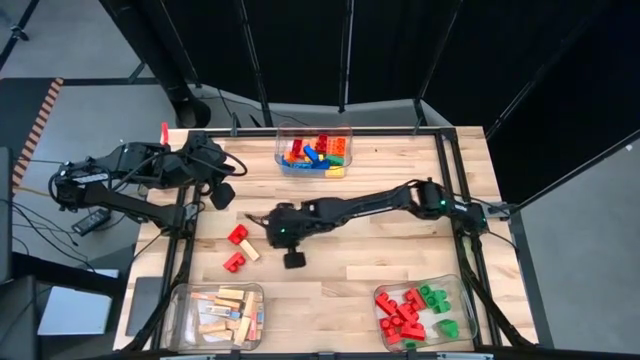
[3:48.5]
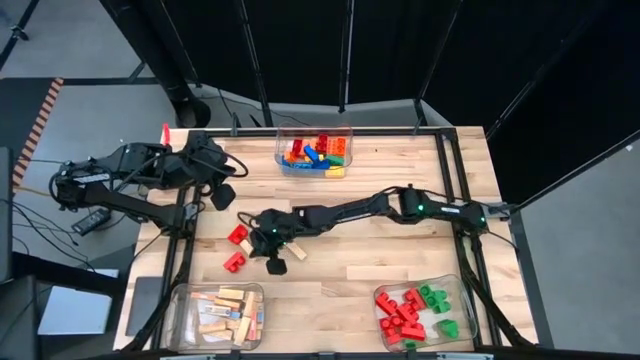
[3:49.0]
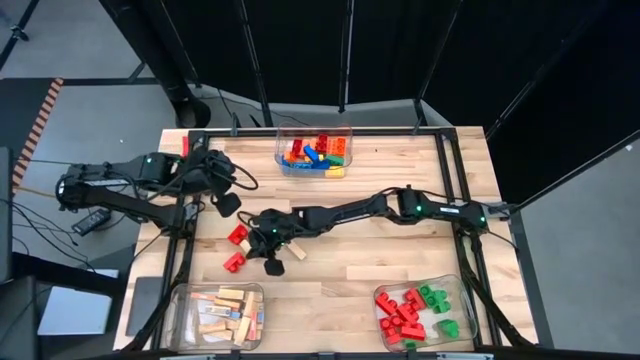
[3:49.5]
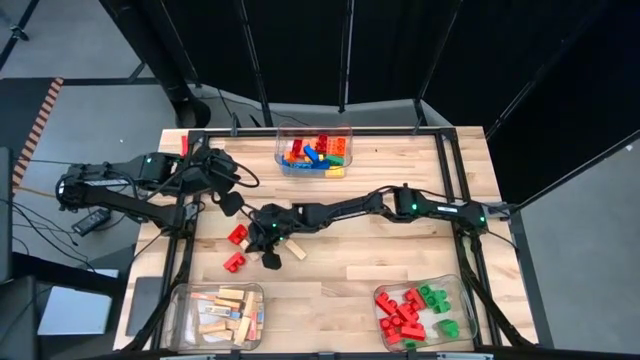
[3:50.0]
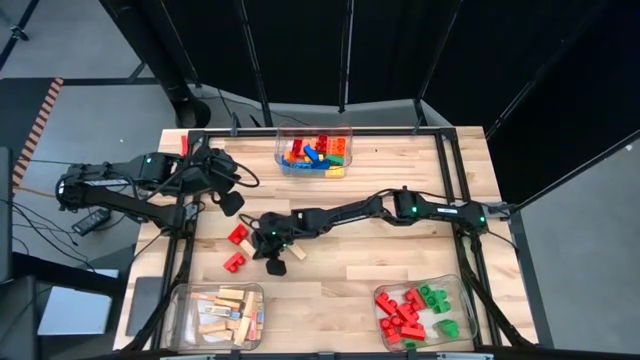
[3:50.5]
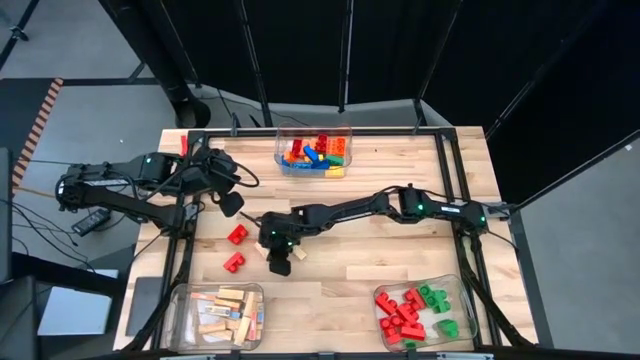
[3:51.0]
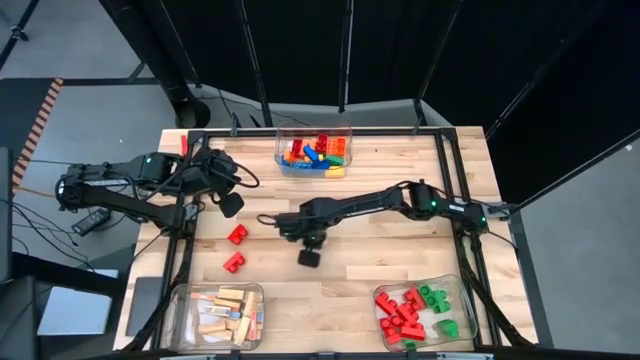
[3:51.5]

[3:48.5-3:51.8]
Task: Sort blocks by size
Move the white block to the center

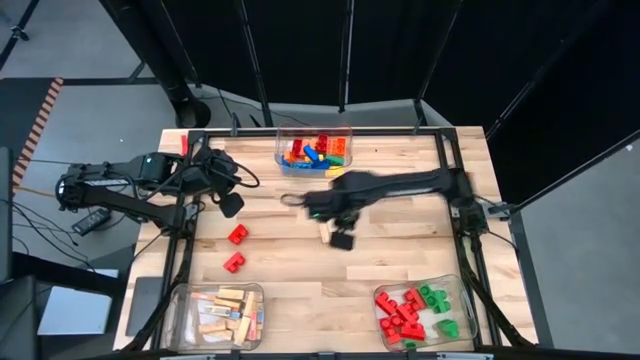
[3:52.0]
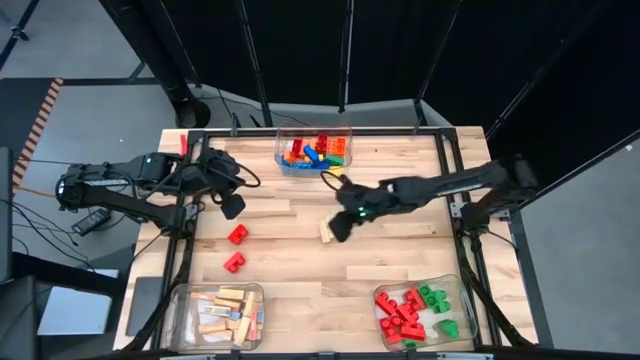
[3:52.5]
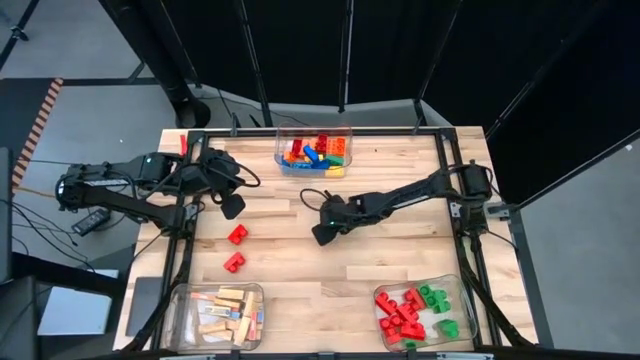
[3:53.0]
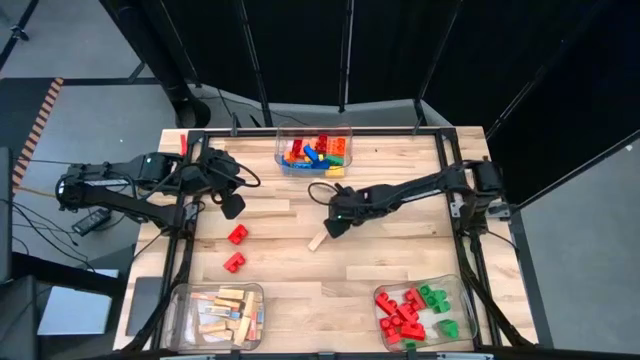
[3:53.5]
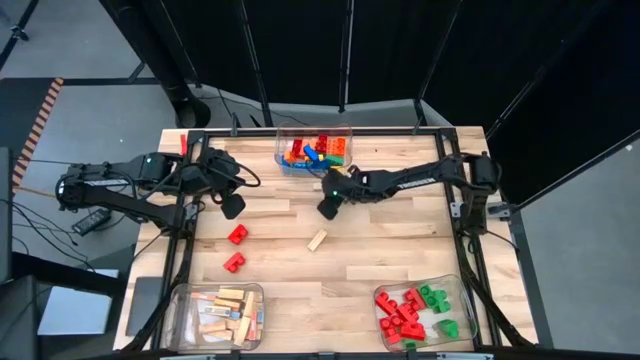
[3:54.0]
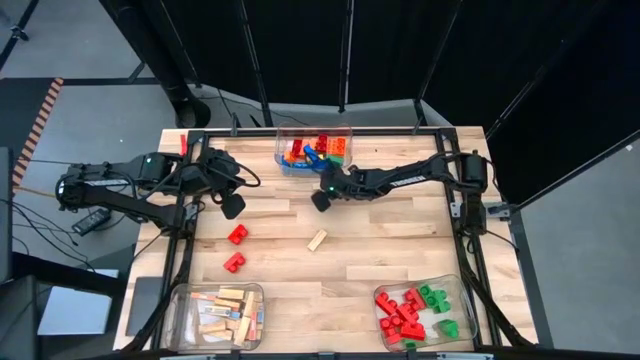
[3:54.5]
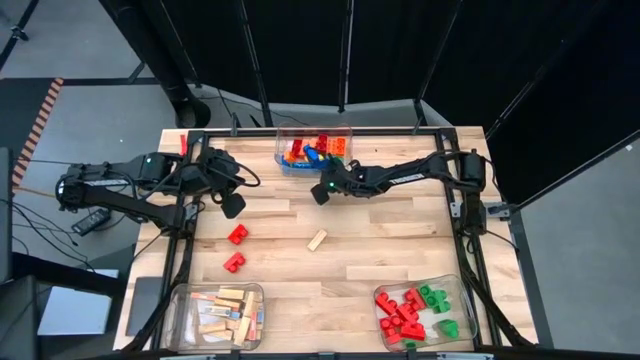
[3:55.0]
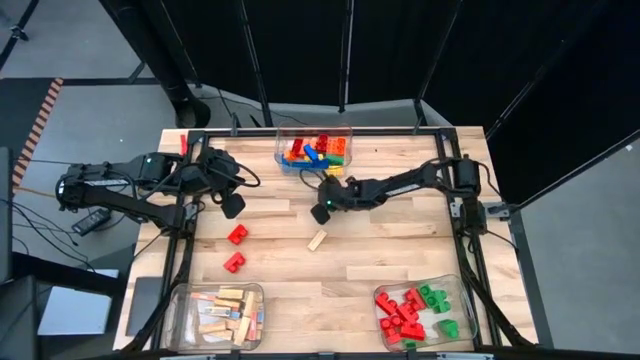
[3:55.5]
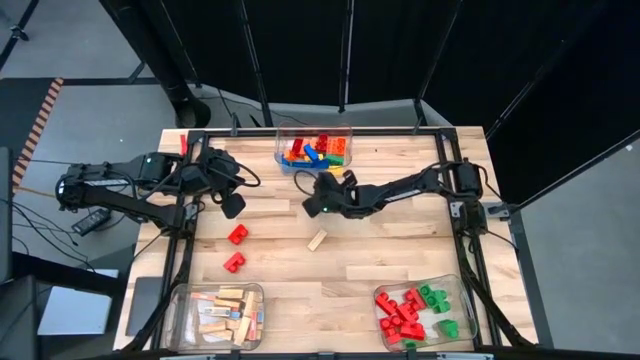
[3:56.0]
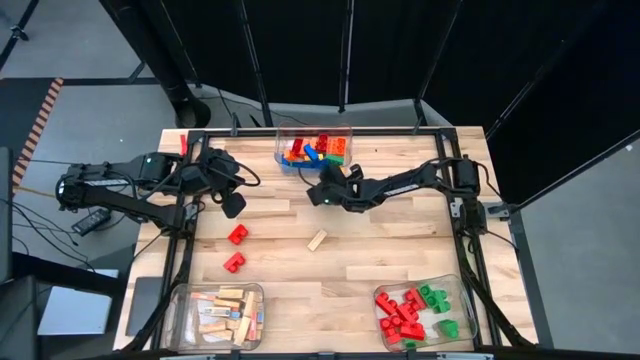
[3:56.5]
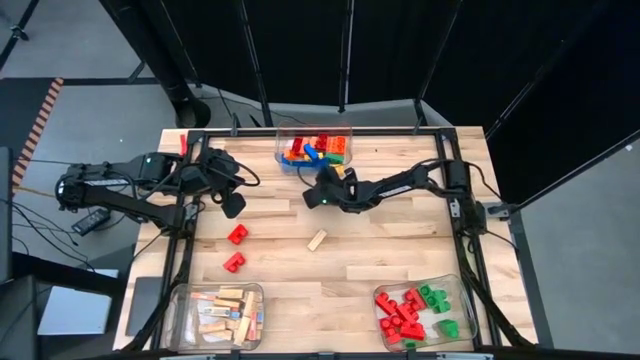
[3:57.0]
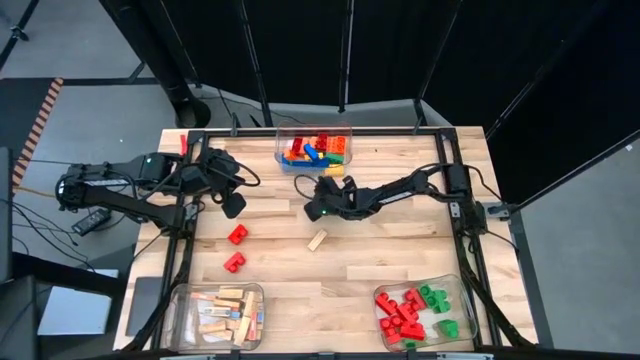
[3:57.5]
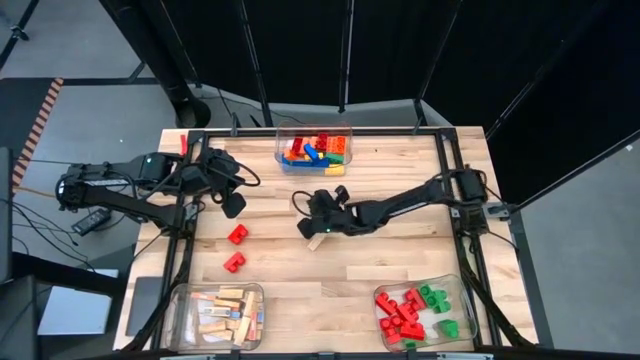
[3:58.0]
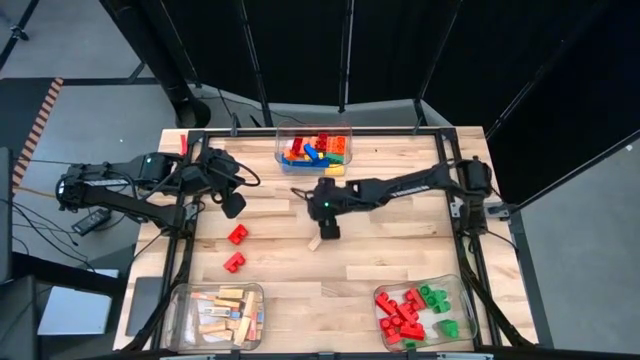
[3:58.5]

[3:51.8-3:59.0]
Put the white block into the bottom left transparent bin

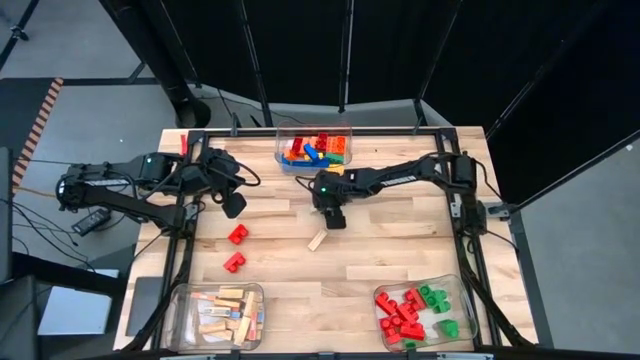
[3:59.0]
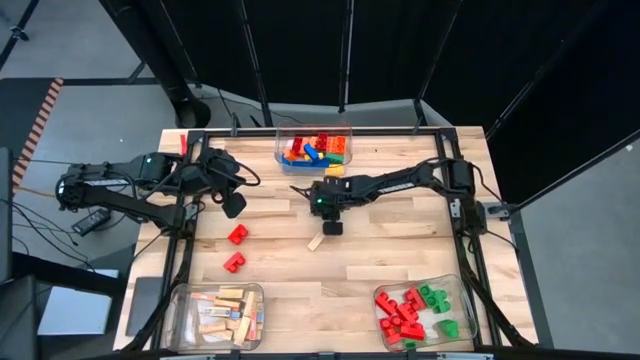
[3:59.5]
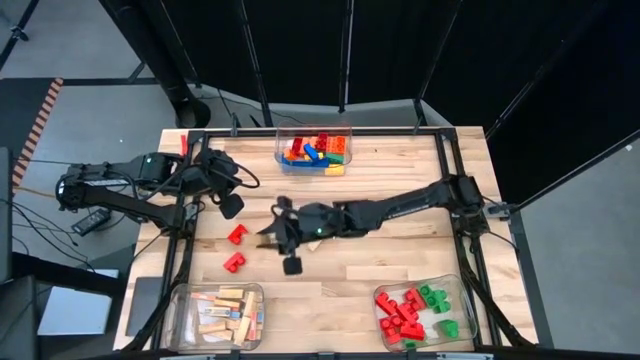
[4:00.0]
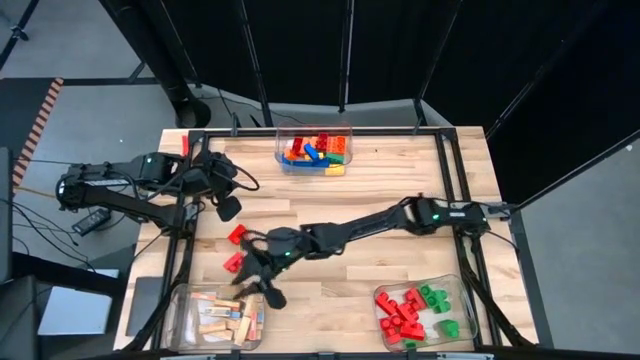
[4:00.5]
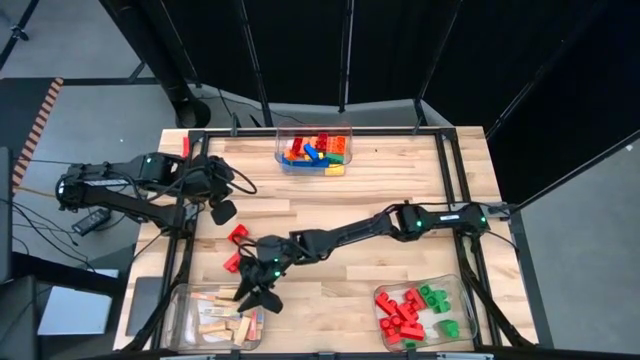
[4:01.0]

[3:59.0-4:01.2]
Put the white block into the bottom left transparent bin

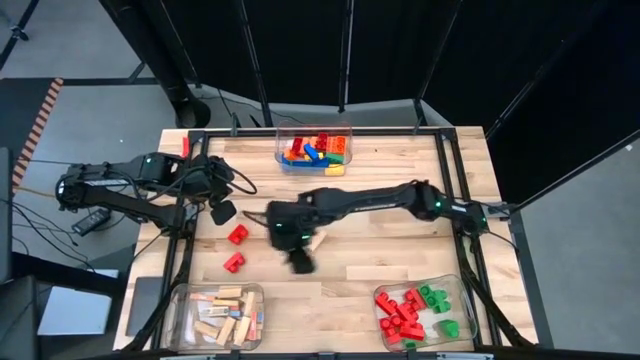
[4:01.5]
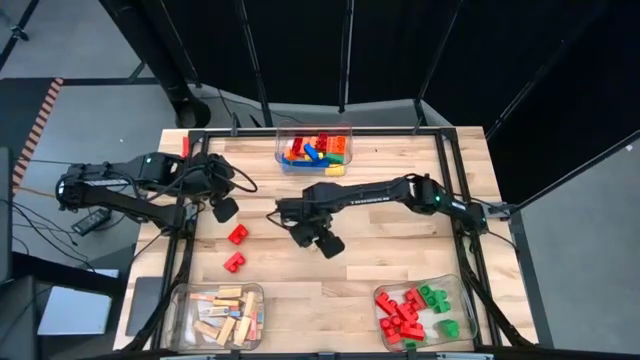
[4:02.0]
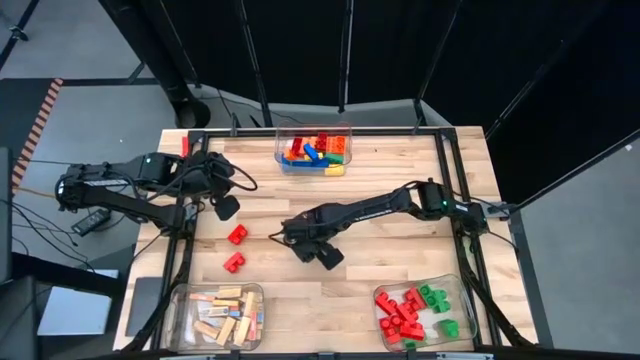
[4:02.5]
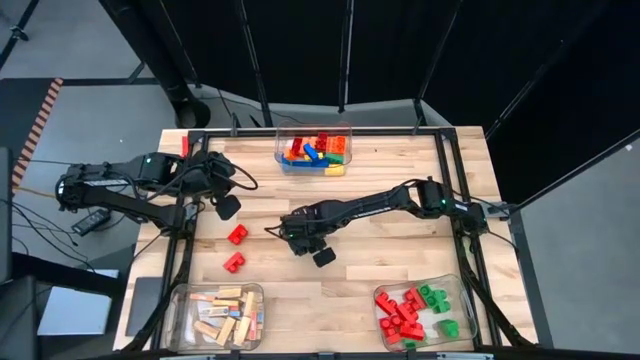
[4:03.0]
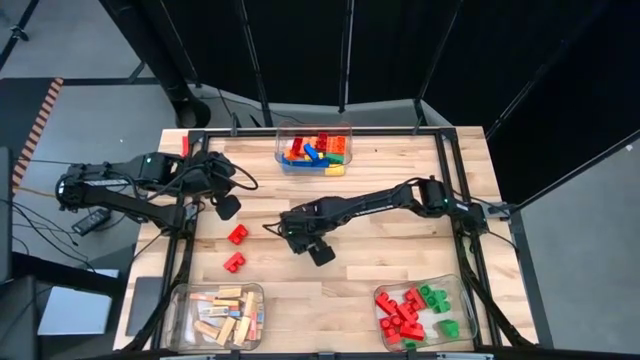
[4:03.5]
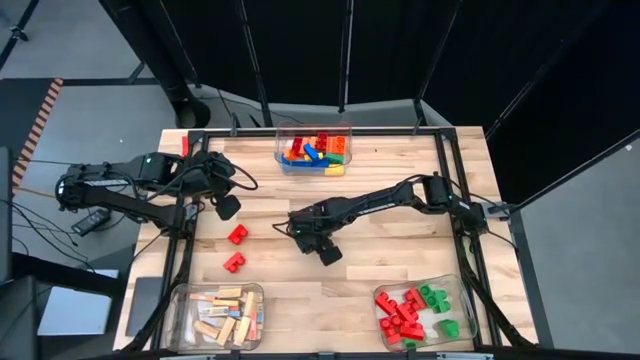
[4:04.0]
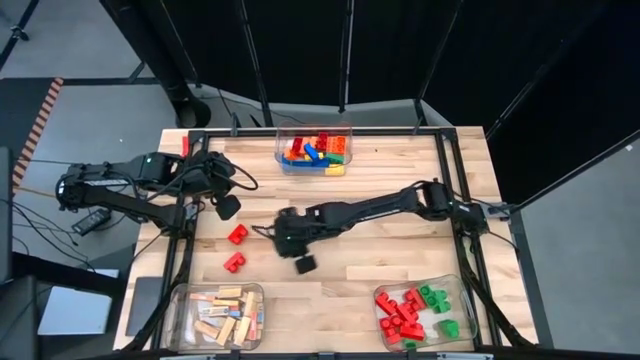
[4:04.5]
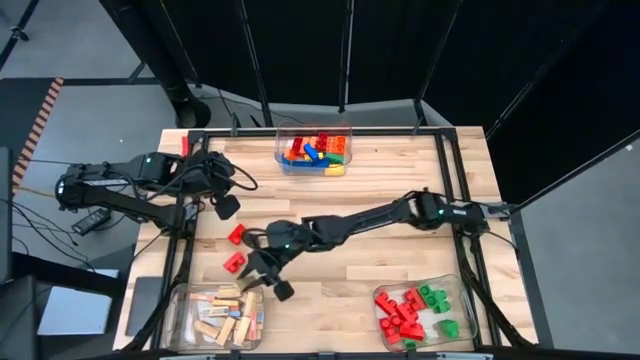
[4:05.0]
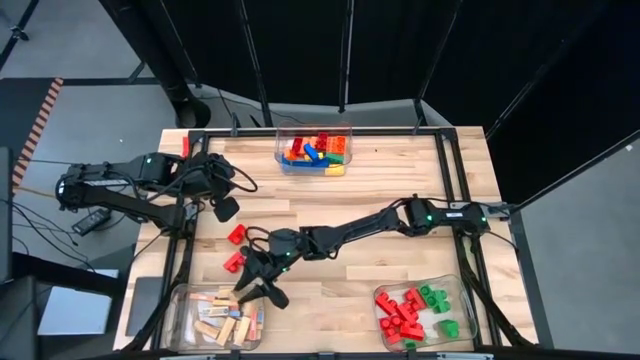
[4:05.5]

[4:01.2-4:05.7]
Put the white block into the bottom left transparent bin

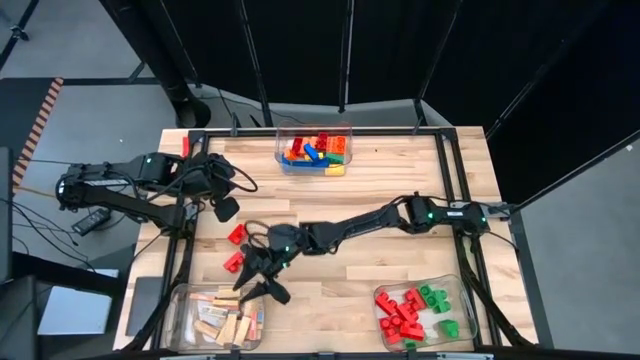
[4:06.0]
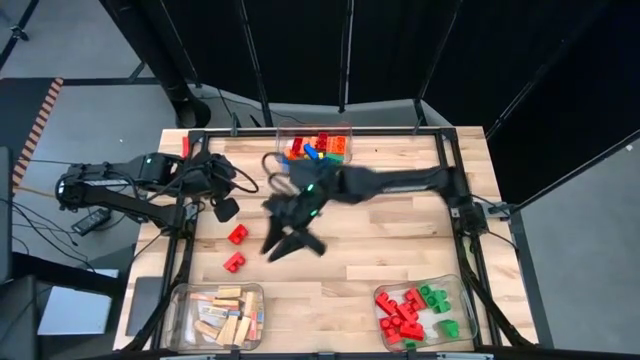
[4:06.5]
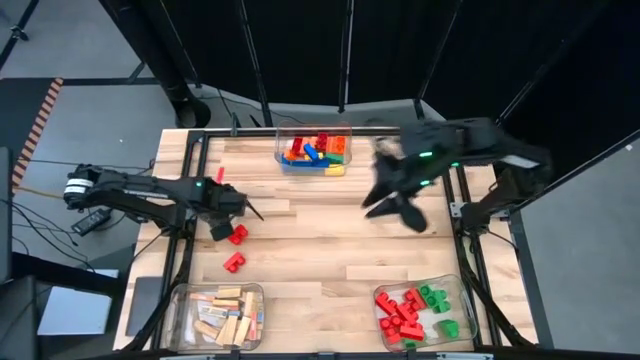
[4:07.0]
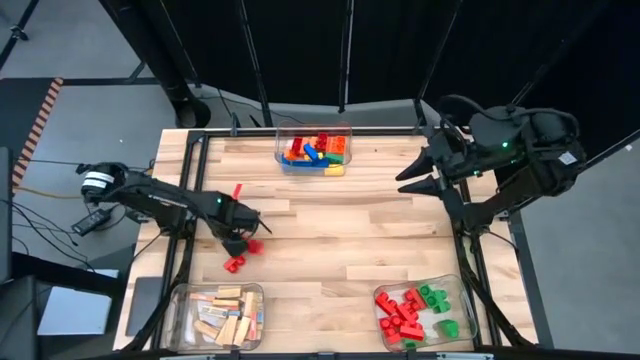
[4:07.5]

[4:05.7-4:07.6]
Move the 2-stud red game piece to the center

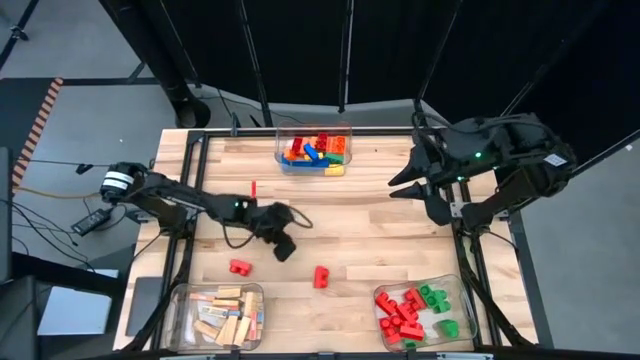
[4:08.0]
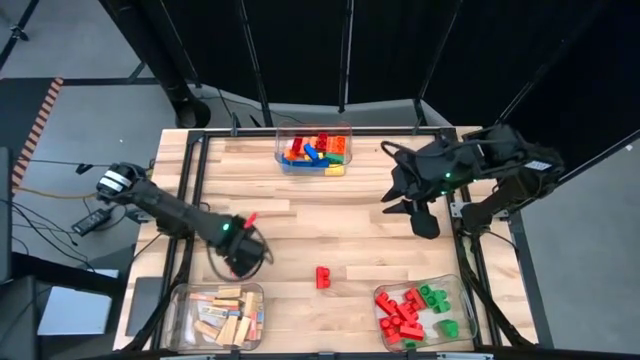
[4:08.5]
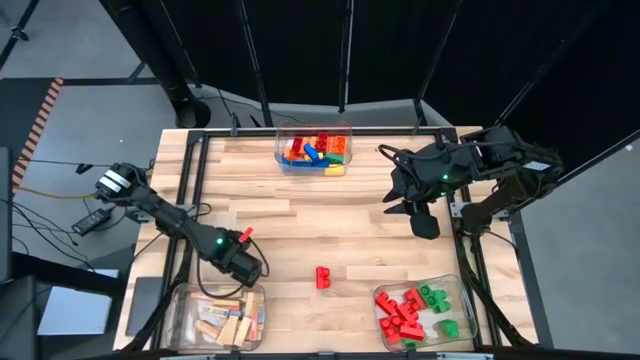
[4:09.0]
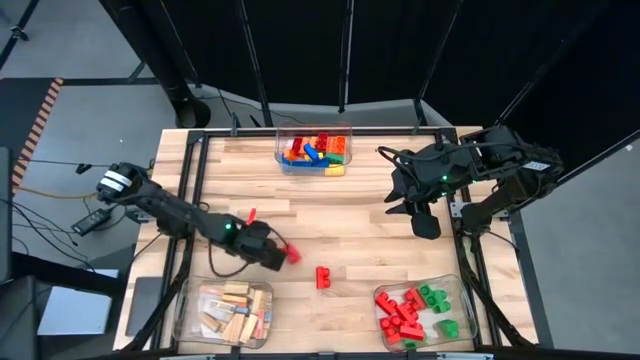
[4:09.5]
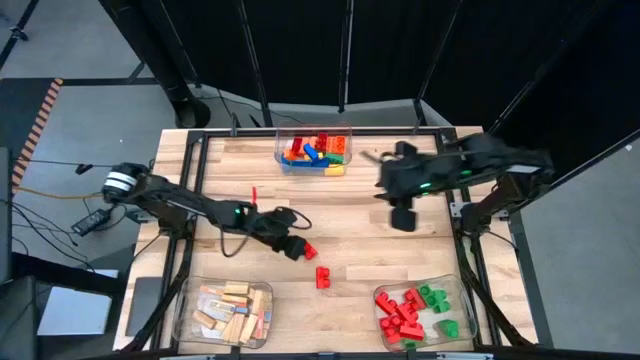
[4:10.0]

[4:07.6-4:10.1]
Move the 2-stud red game piece to the center
